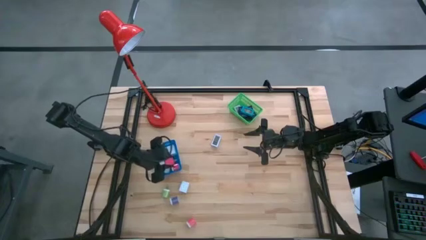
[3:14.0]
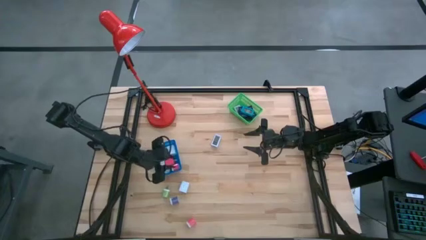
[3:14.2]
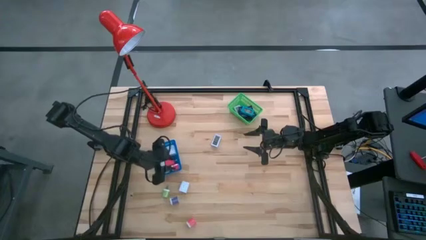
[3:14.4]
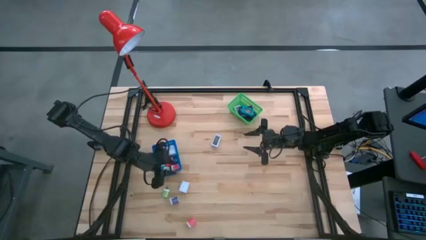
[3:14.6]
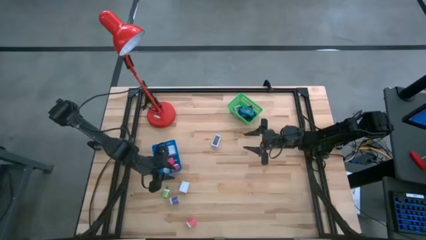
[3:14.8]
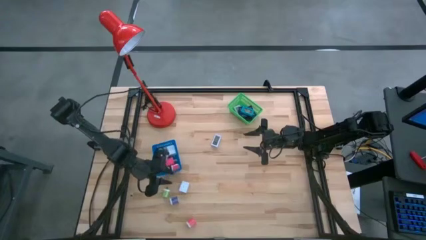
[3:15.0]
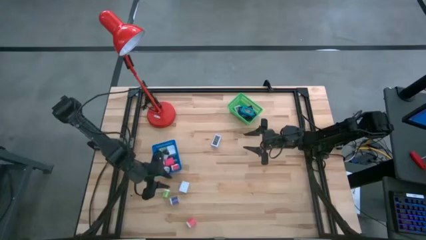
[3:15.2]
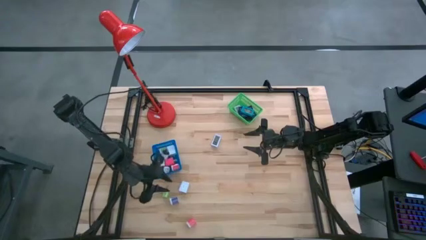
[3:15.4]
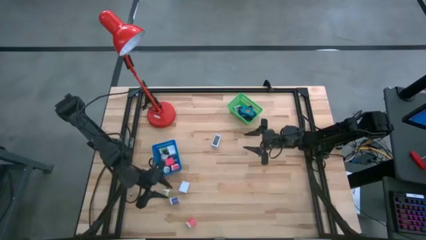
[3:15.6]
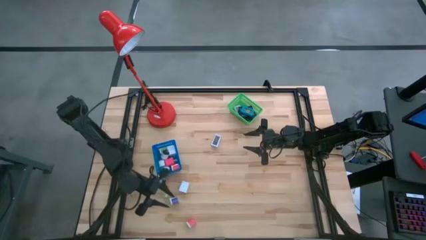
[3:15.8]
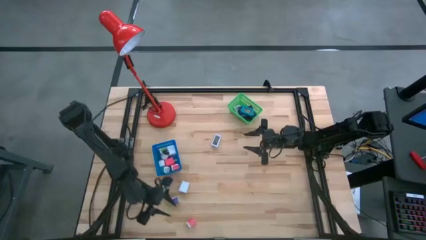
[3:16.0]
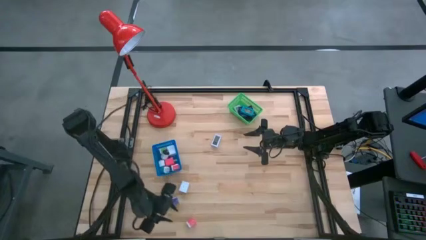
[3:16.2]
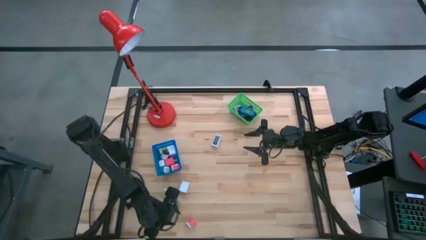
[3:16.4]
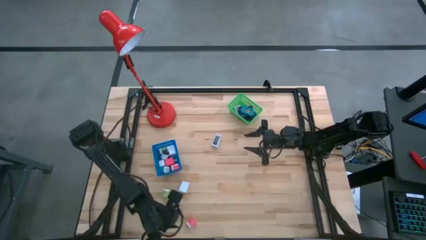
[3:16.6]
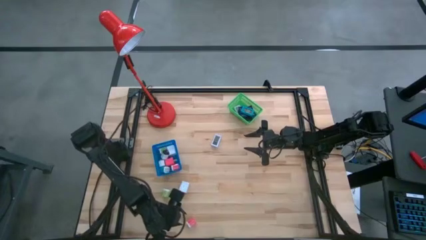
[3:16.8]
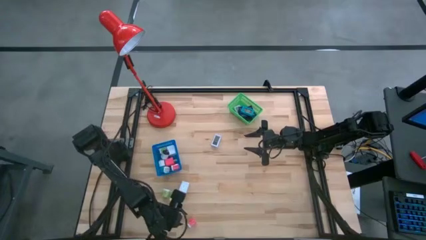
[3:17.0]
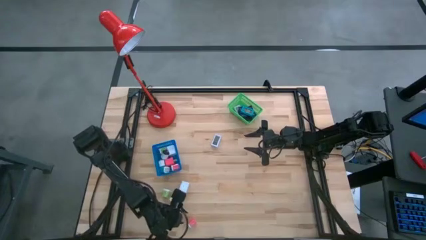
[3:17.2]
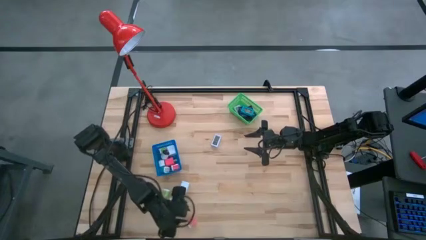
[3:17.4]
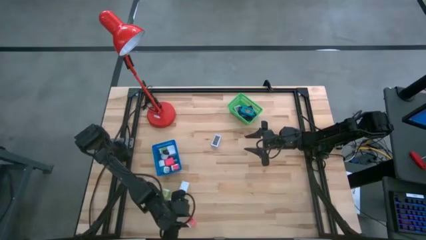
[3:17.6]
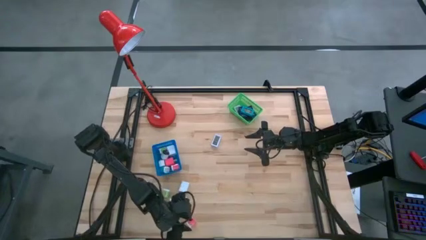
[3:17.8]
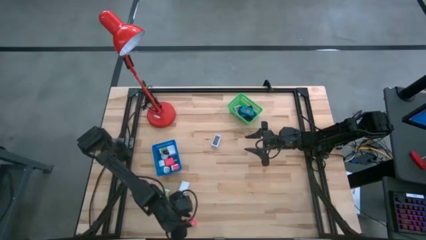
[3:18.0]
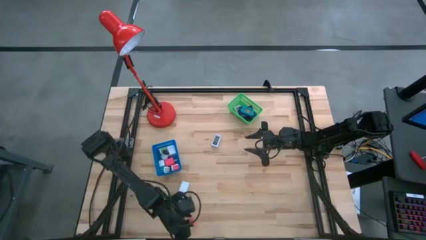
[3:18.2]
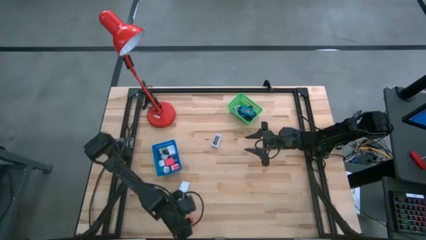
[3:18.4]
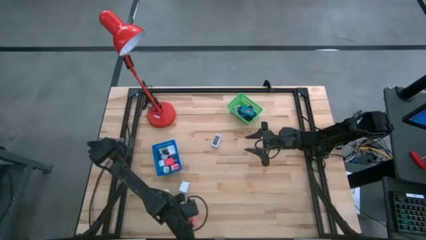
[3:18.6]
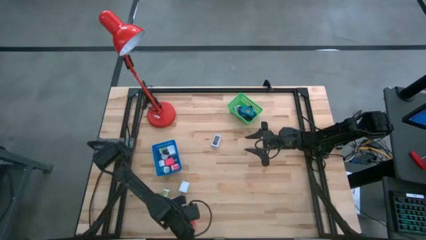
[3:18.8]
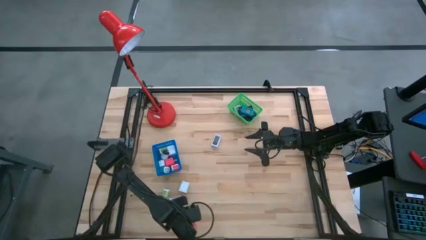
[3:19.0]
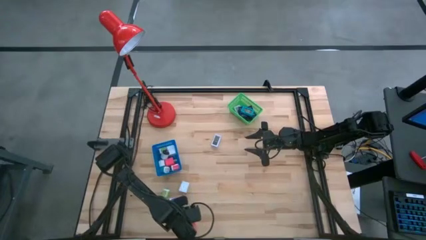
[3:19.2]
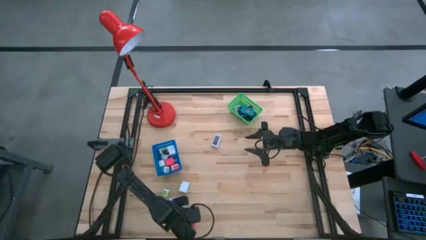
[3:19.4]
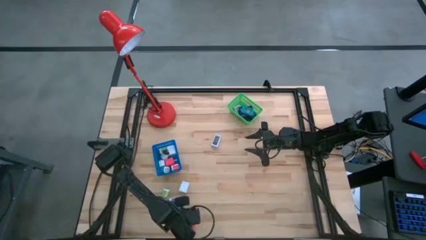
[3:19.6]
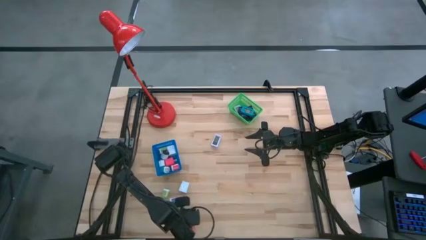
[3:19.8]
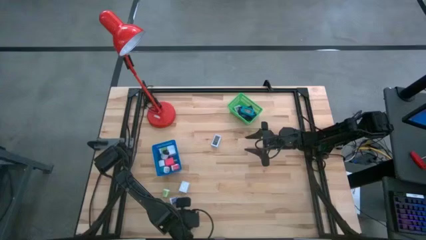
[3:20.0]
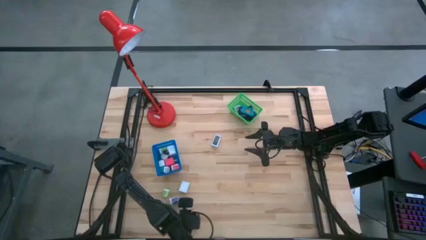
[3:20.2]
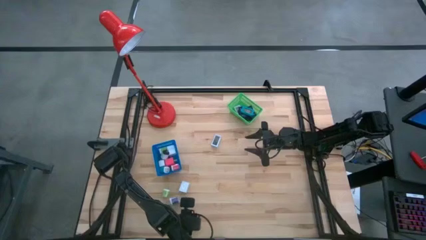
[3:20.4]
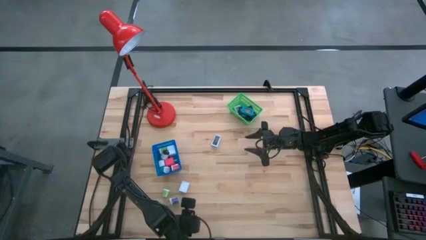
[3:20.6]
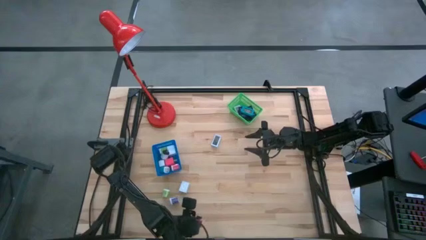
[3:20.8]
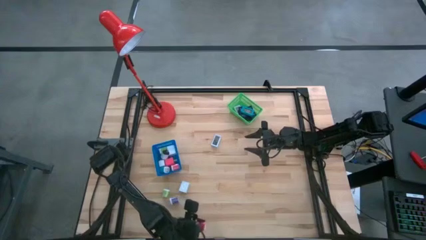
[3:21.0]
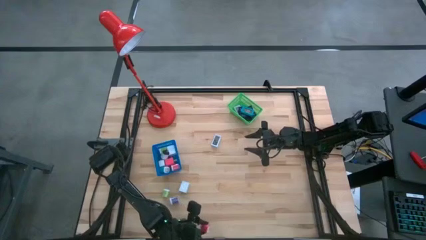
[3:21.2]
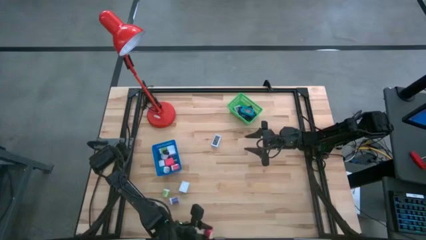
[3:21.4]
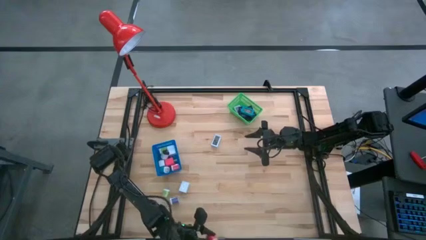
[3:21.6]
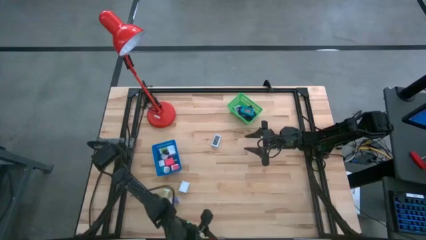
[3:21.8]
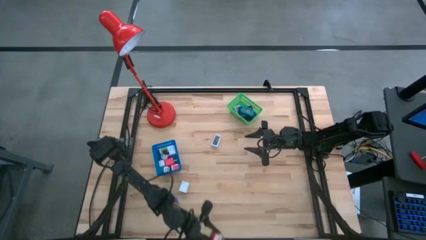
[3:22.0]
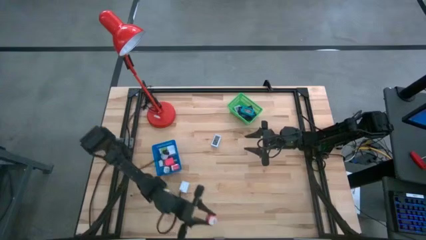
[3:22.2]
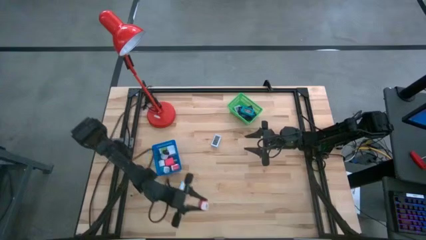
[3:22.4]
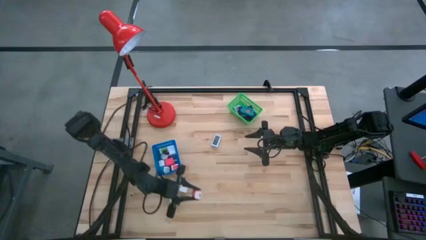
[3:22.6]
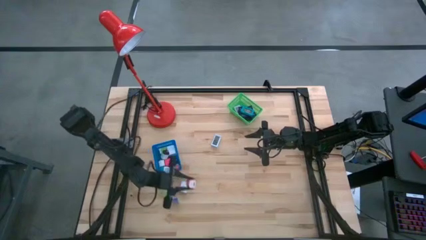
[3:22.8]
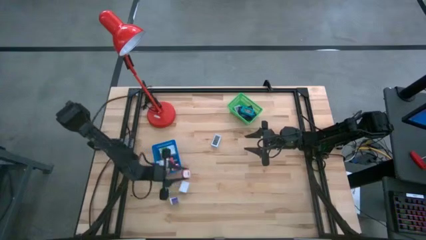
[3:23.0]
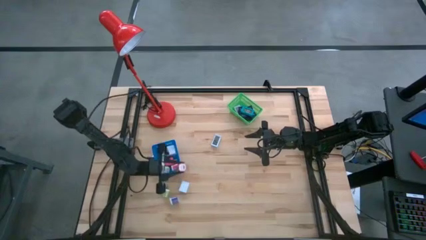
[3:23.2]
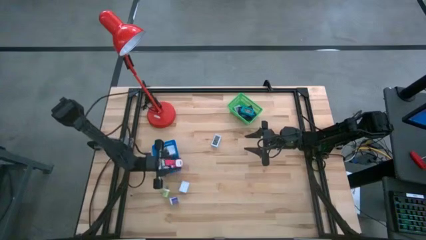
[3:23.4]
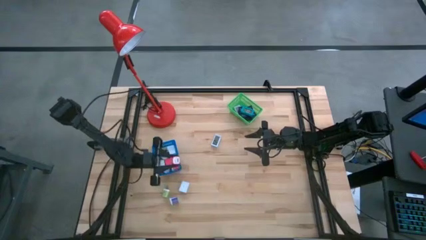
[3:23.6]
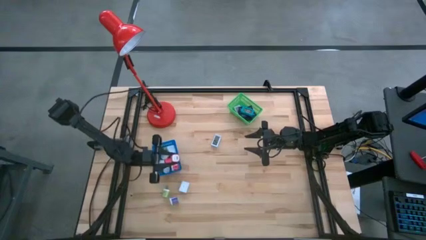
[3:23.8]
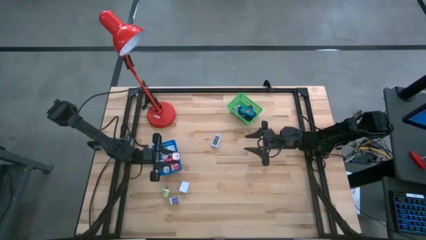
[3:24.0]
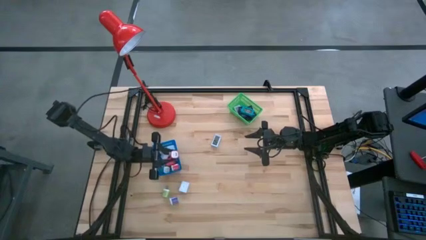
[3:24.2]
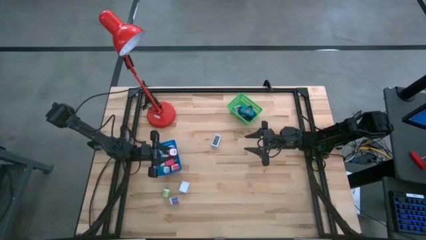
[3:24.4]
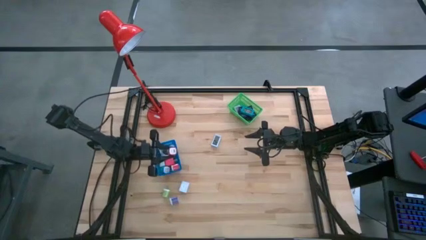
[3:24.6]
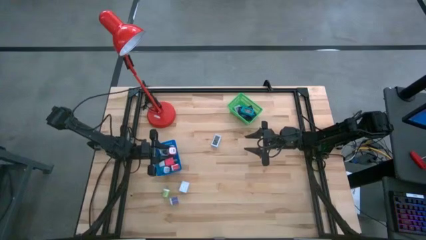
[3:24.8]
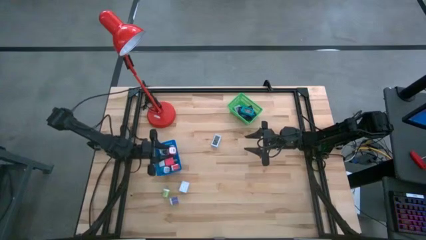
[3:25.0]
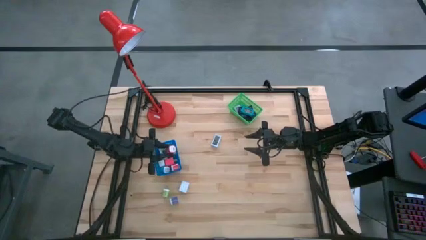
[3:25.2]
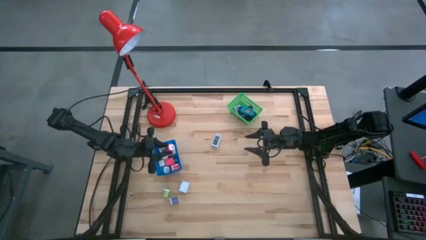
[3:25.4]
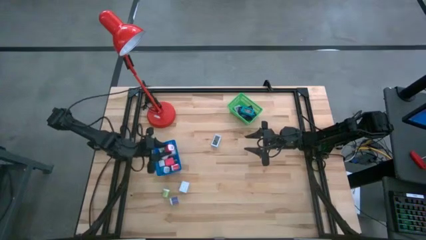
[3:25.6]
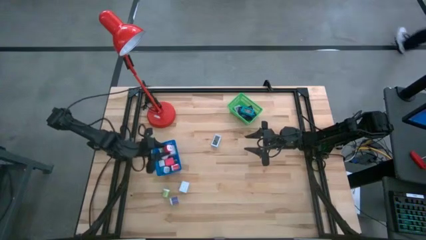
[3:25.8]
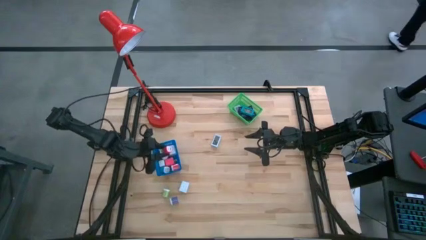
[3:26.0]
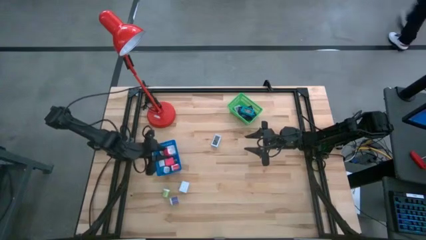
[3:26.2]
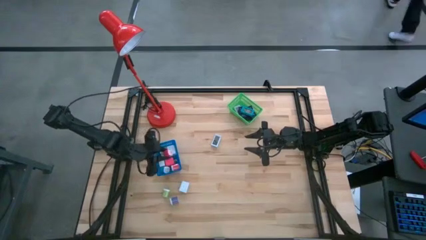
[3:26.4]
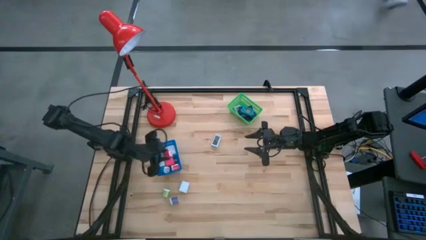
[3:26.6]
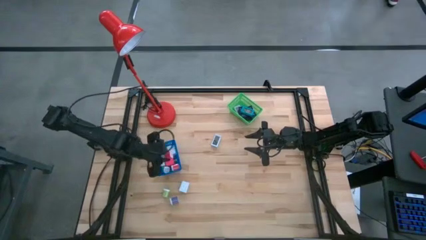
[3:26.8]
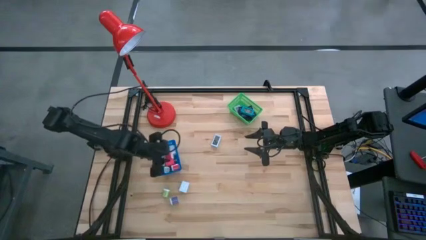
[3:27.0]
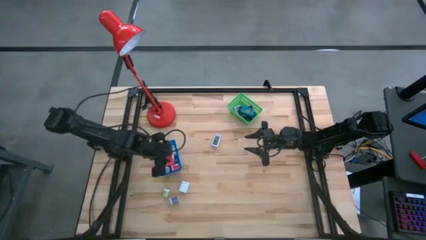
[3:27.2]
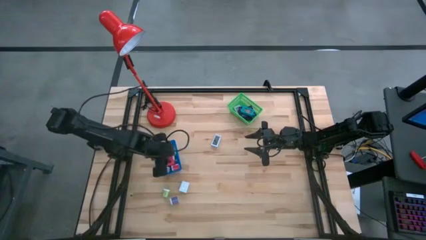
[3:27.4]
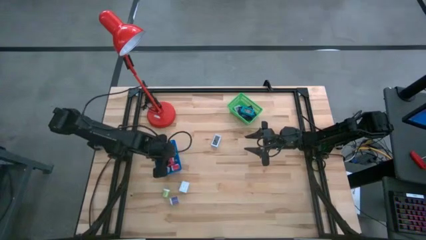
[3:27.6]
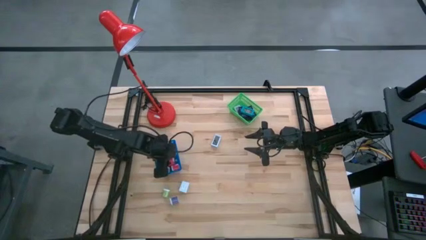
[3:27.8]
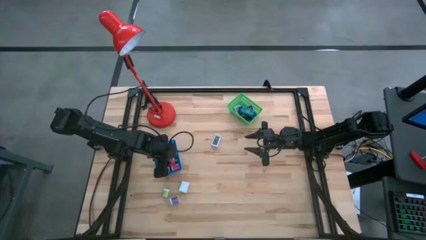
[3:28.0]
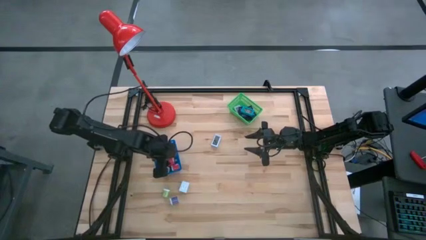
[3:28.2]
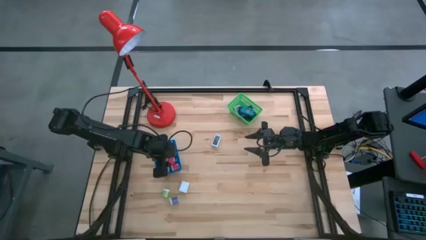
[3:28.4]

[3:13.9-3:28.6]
Task: Pick & Place Office items
Put the pink white charger adapter into the blue basket
